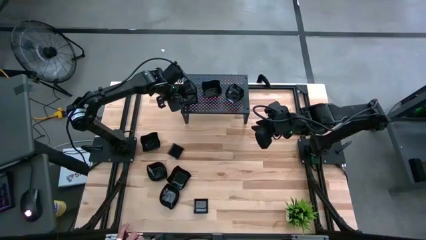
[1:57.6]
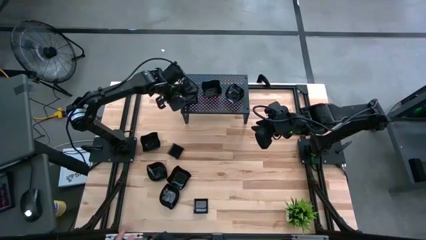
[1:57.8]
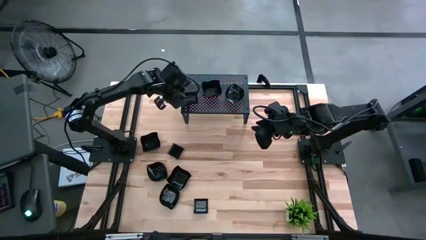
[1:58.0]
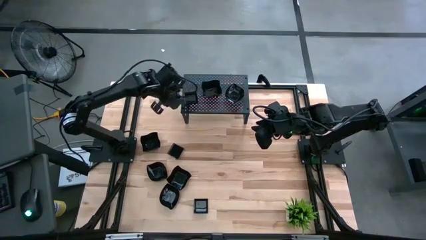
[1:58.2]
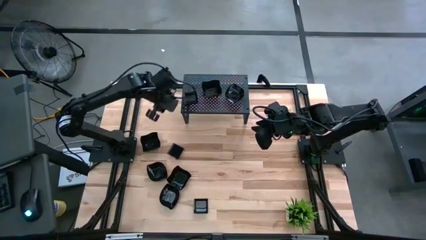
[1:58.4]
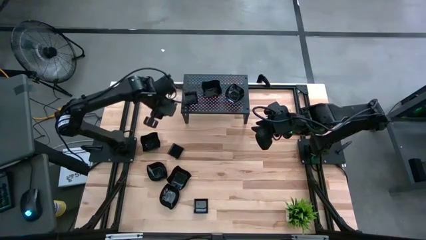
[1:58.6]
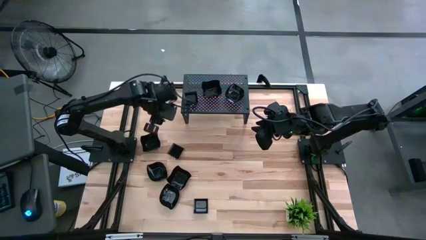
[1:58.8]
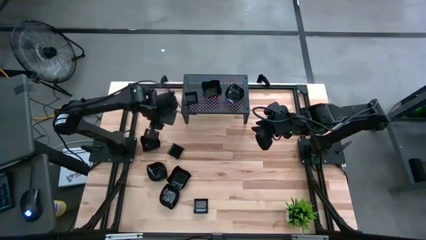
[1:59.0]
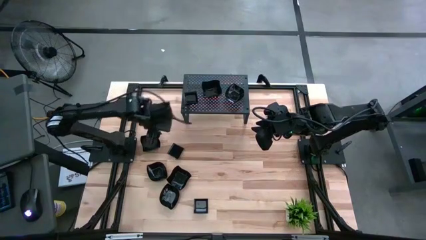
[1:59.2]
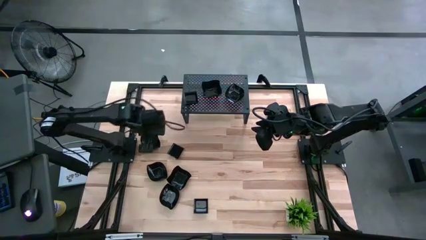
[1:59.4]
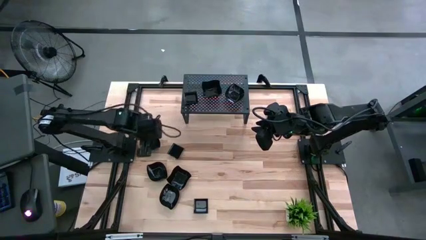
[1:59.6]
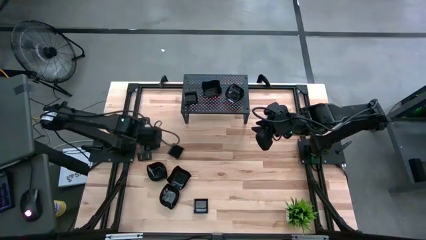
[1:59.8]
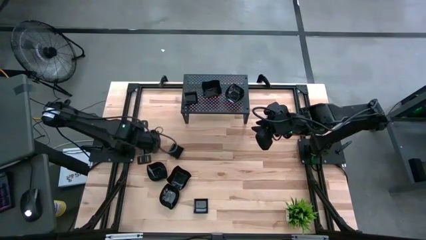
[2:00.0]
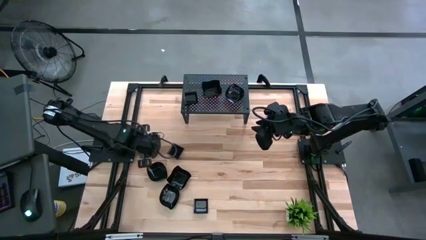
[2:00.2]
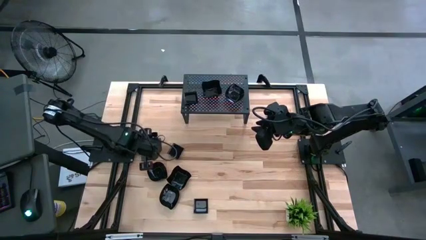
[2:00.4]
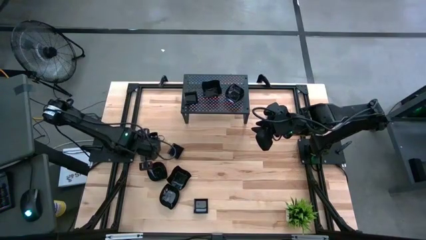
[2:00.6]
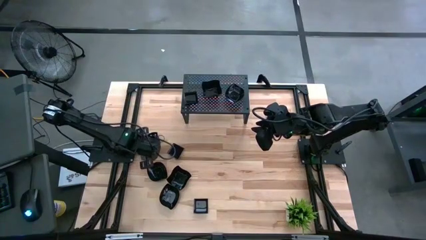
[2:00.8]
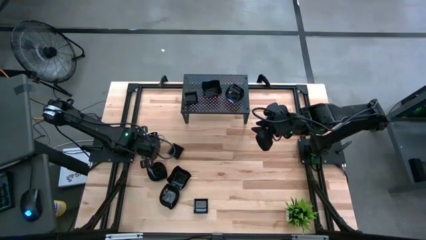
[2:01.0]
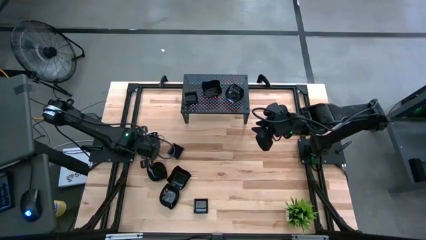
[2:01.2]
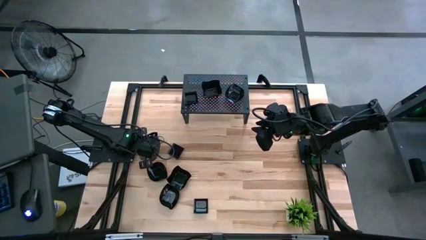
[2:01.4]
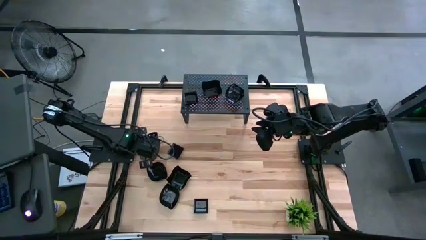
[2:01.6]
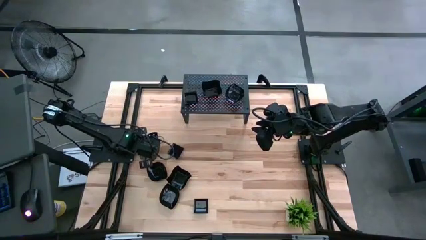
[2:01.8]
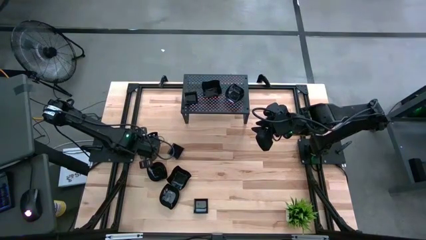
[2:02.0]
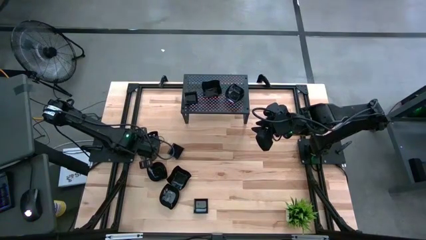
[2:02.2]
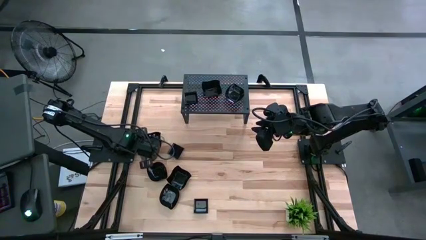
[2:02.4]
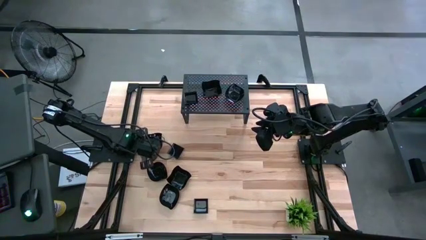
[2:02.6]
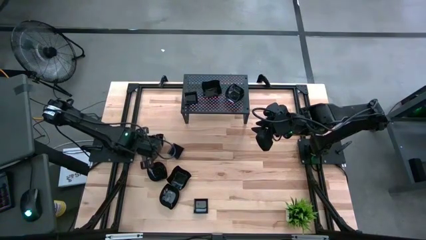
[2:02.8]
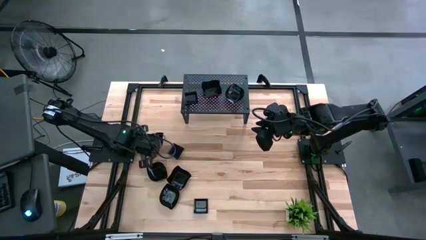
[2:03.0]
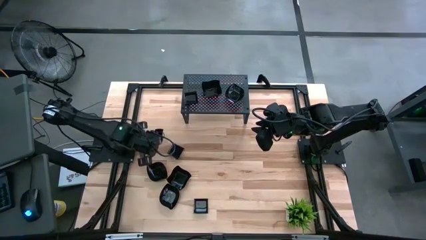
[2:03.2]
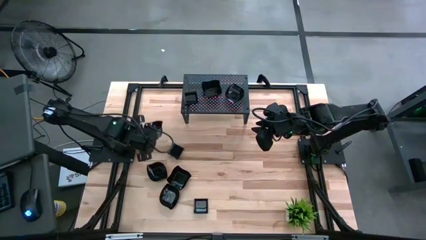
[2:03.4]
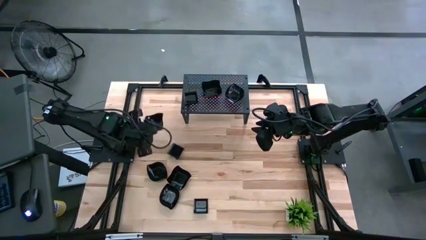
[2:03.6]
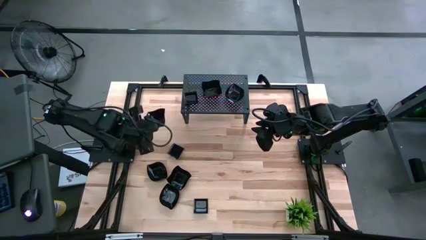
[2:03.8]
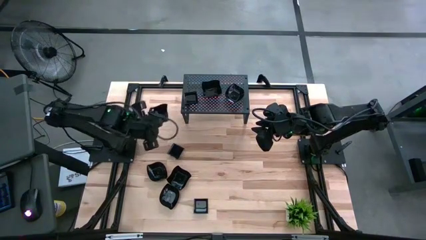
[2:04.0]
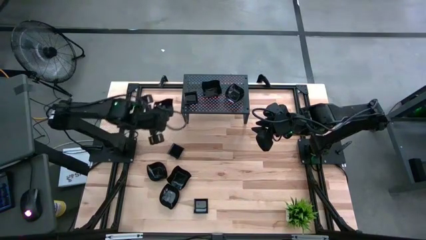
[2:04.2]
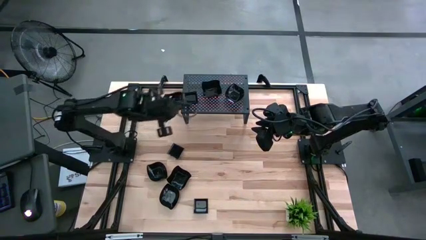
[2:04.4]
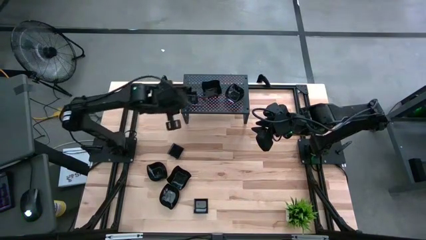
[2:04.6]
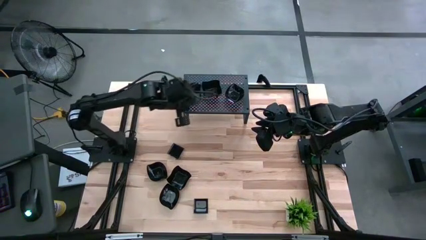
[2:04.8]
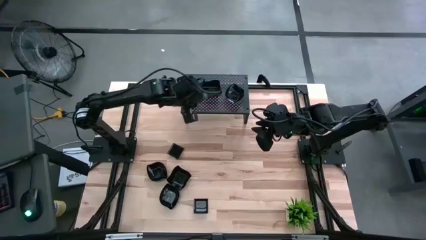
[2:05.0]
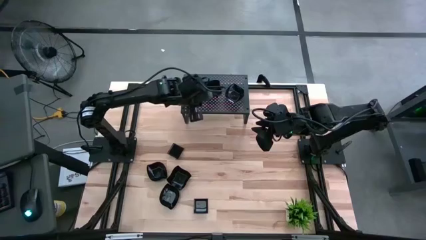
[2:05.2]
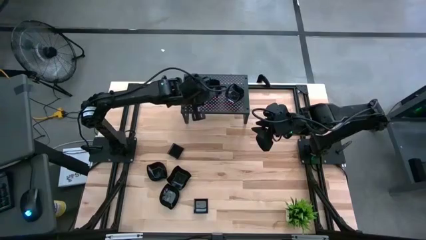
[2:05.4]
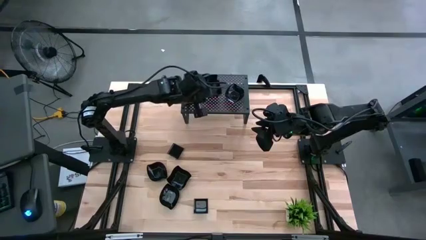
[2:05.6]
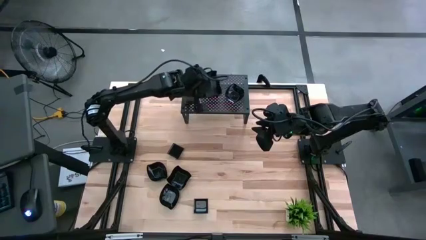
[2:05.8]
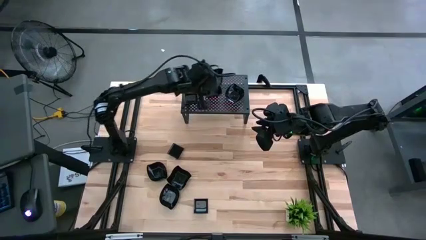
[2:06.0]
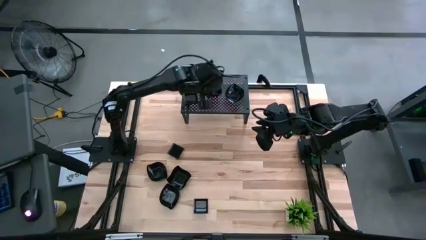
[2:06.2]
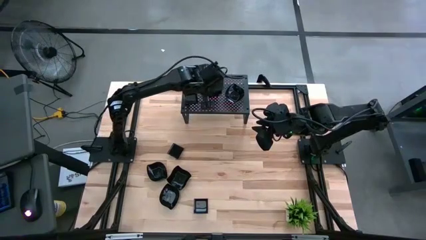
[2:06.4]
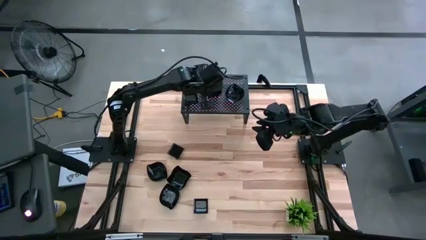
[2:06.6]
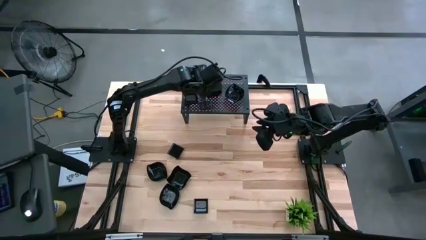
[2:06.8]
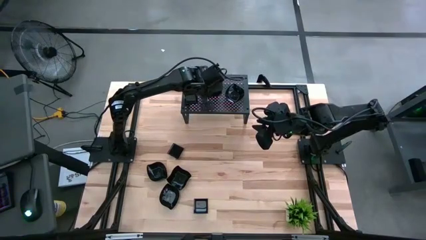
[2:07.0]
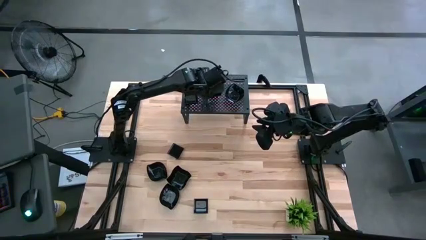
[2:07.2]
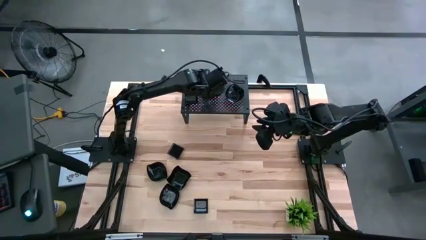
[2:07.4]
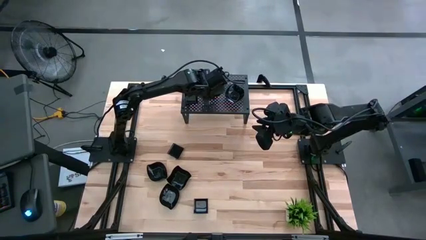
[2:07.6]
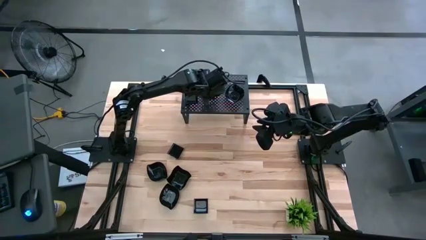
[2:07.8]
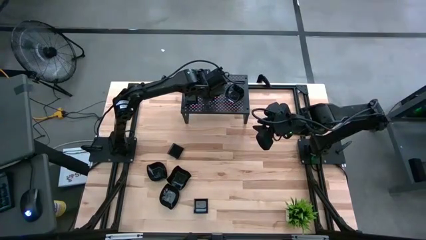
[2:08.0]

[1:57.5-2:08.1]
Task: Pick & Place Mini shaped plates
Stack the distorted square plate on top of the distorted square plate on the shelf
